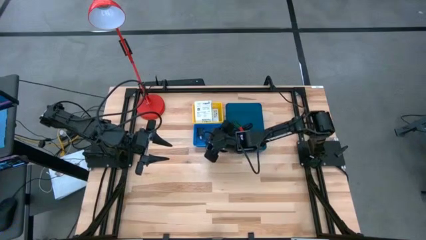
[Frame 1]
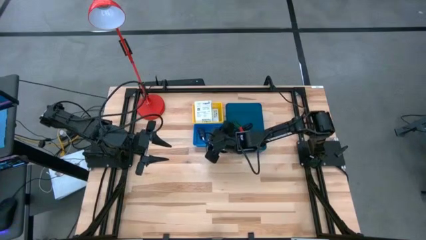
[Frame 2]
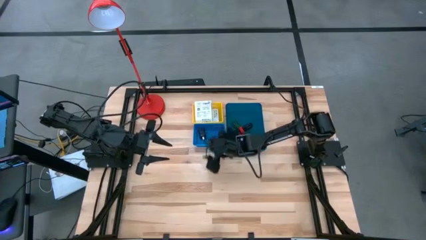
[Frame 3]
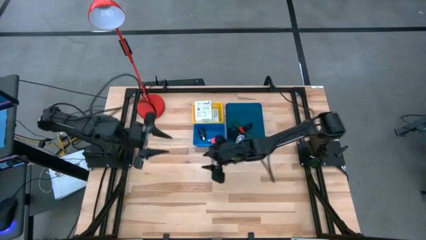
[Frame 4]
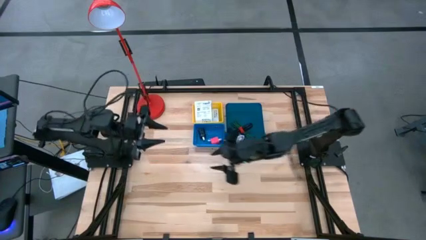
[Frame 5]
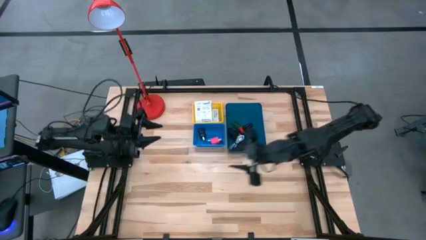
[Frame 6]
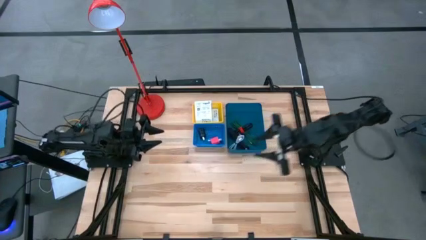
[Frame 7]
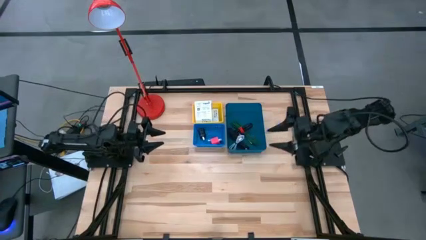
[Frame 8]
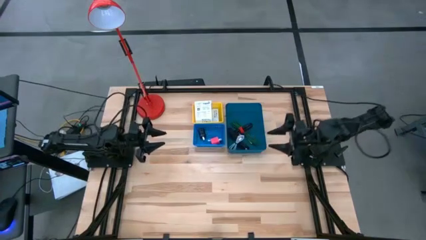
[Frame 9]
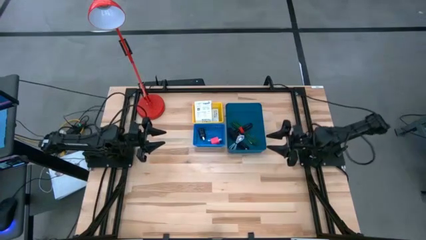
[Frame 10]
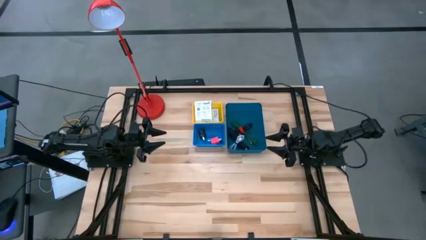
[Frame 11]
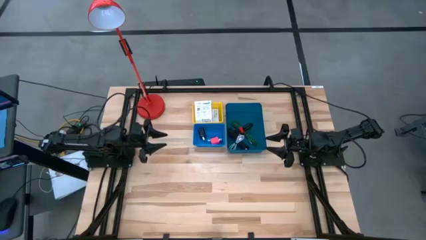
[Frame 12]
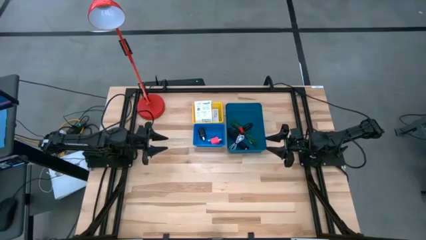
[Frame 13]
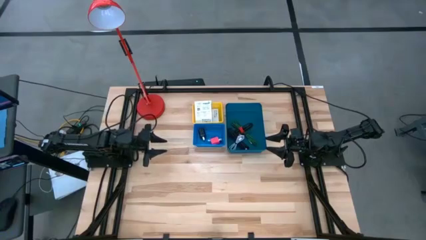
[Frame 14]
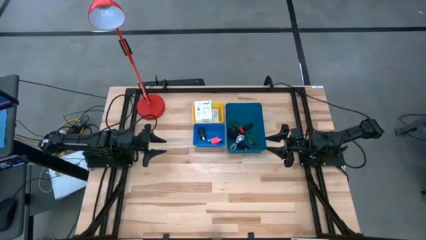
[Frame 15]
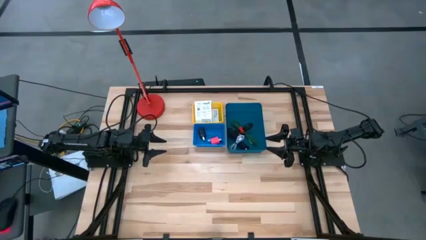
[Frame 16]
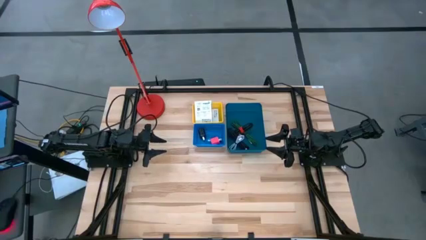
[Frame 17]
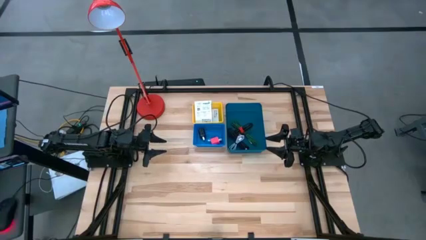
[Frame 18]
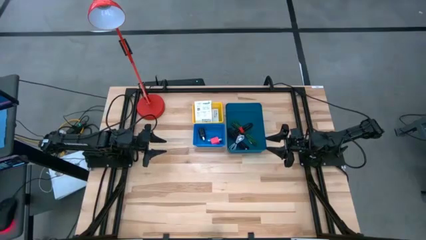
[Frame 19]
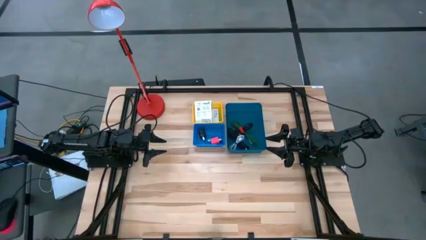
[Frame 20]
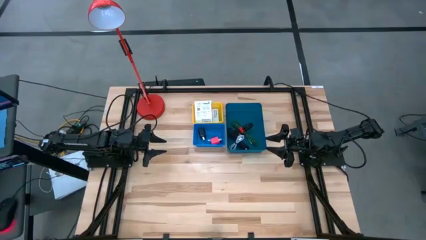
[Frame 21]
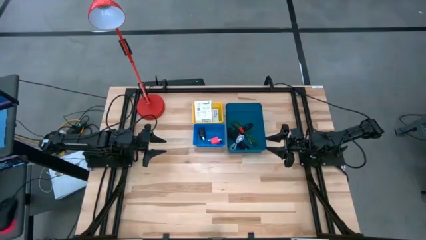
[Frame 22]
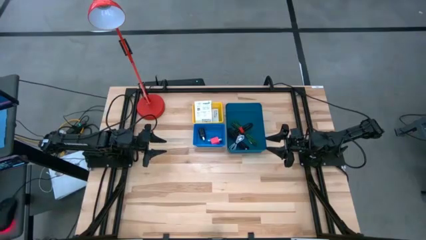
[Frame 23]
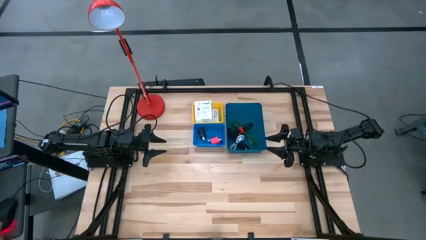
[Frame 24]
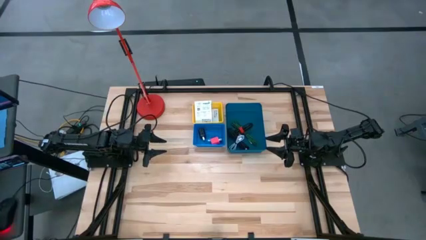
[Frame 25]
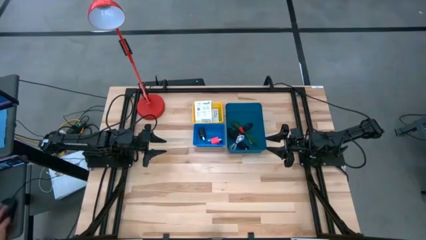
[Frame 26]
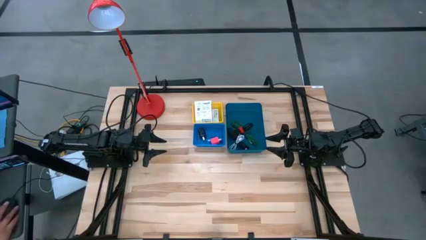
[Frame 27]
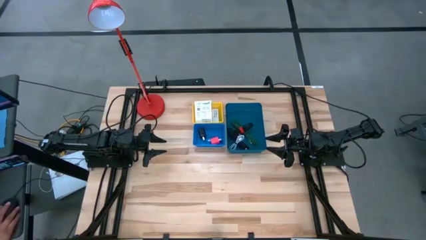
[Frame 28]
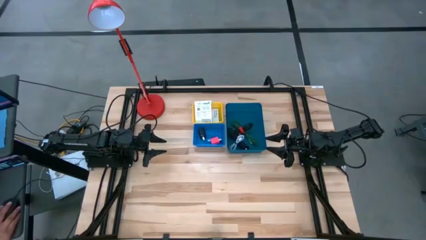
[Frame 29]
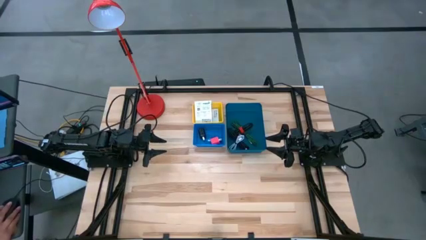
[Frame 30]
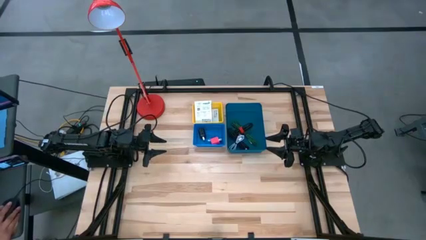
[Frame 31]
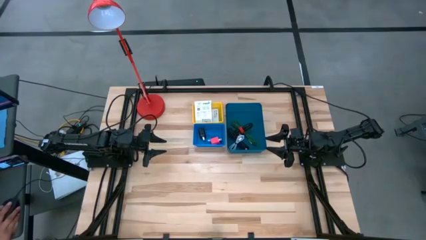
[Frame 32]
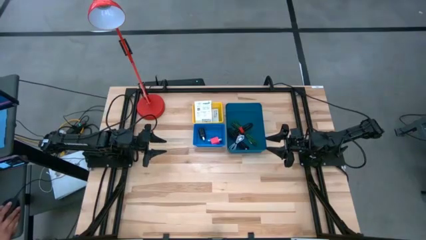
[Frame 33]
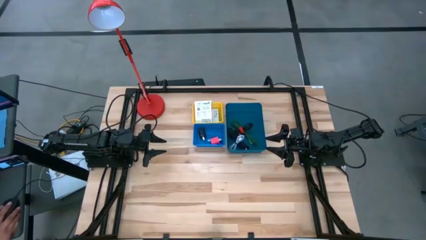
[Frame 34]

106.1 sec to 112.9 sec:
Task: Pick and place items into bin
Return to Home Position

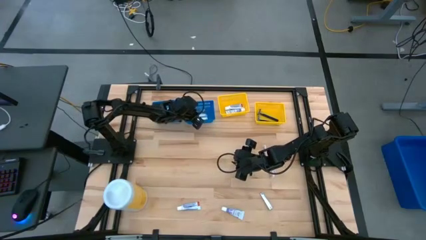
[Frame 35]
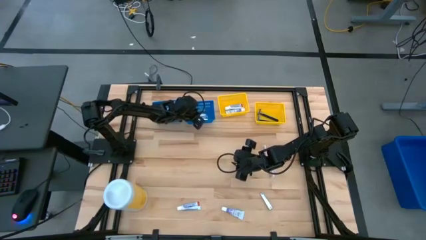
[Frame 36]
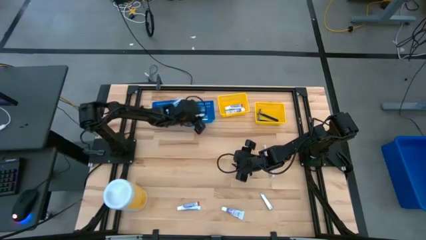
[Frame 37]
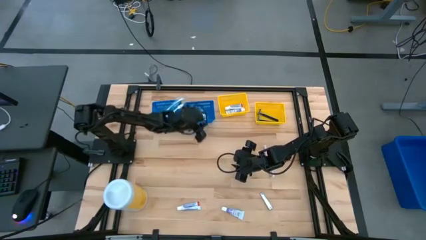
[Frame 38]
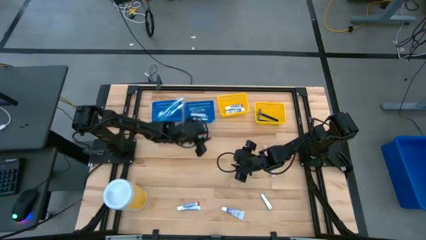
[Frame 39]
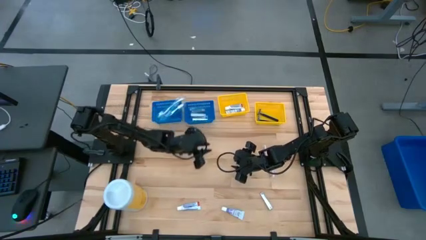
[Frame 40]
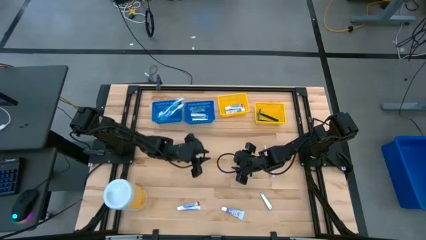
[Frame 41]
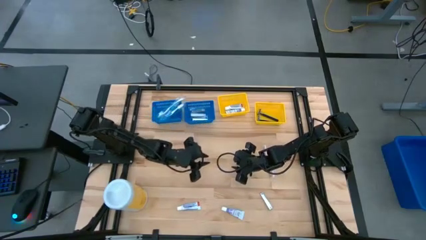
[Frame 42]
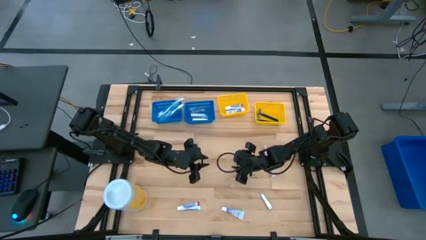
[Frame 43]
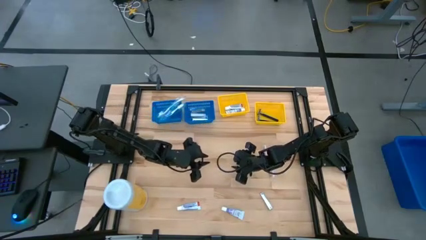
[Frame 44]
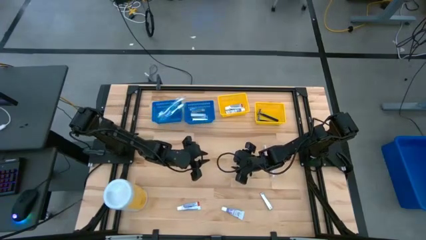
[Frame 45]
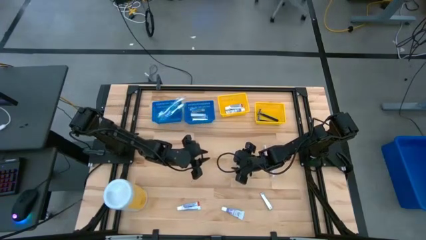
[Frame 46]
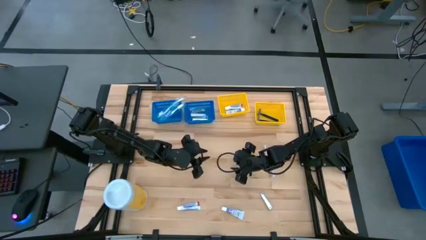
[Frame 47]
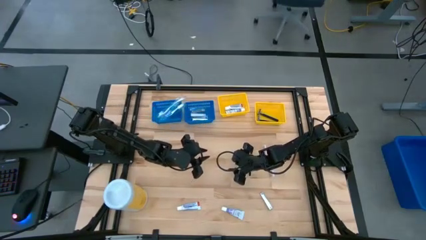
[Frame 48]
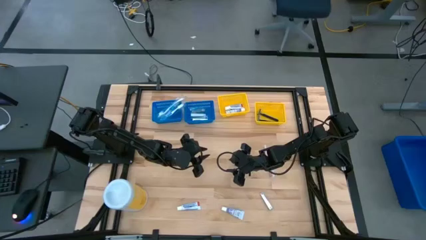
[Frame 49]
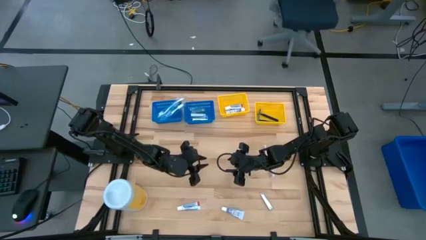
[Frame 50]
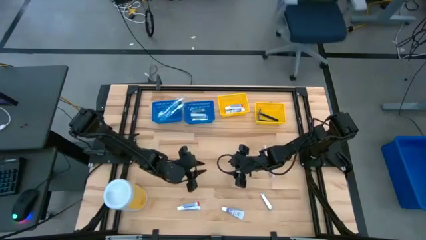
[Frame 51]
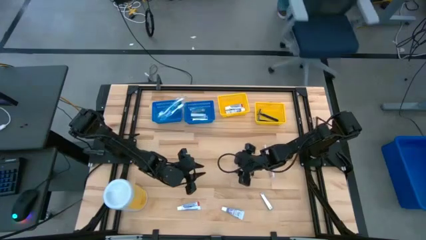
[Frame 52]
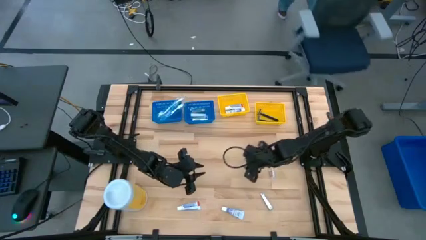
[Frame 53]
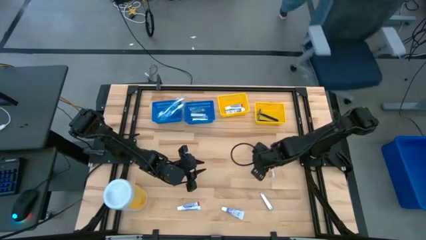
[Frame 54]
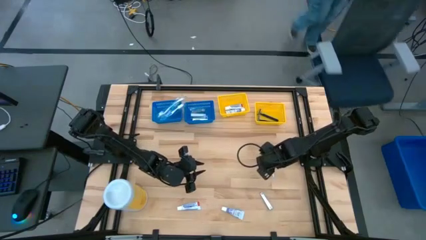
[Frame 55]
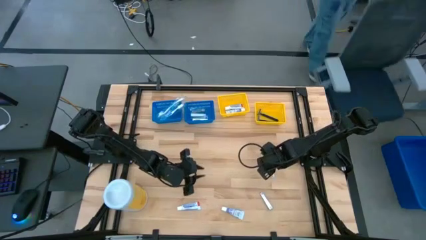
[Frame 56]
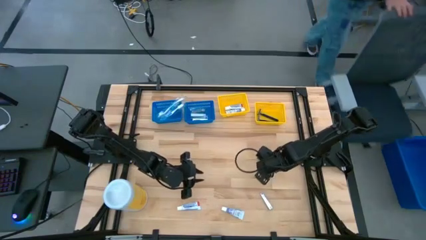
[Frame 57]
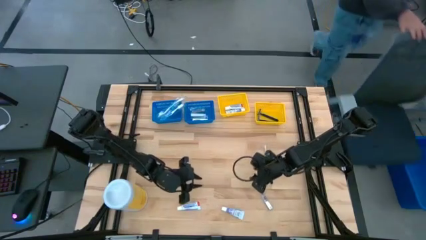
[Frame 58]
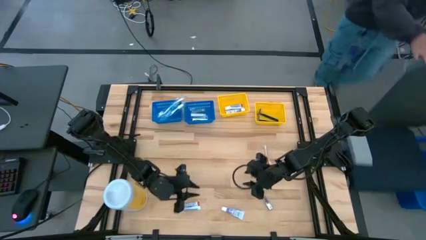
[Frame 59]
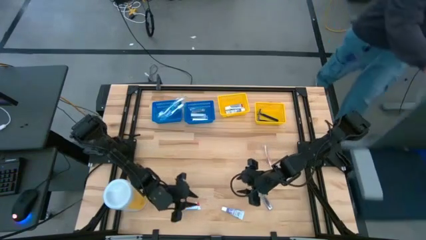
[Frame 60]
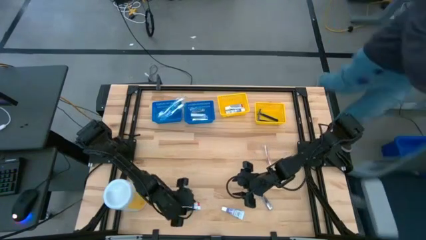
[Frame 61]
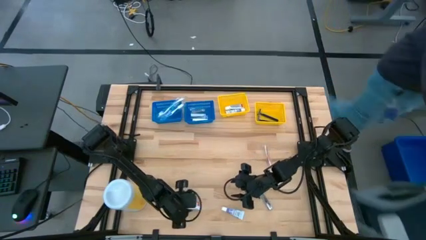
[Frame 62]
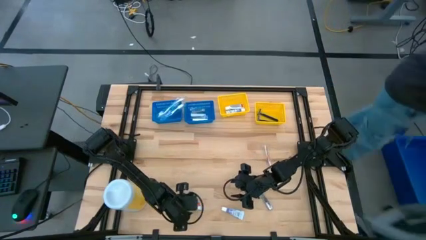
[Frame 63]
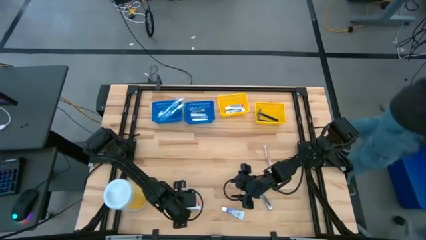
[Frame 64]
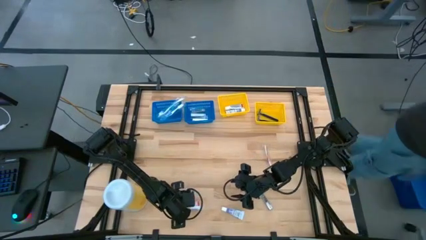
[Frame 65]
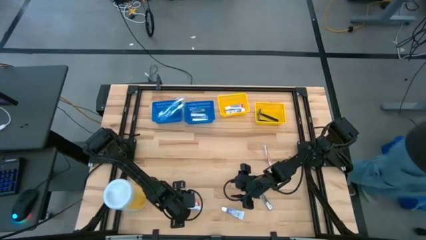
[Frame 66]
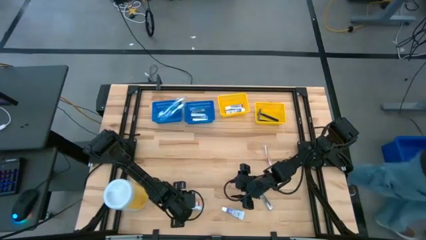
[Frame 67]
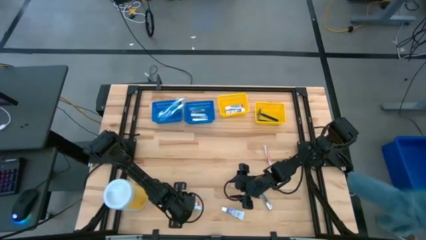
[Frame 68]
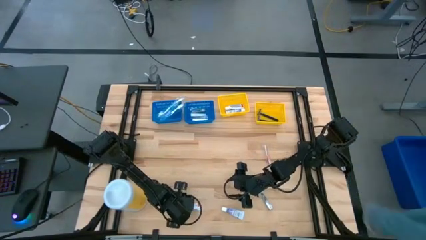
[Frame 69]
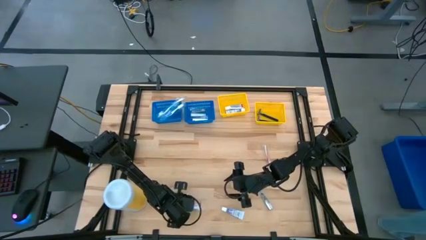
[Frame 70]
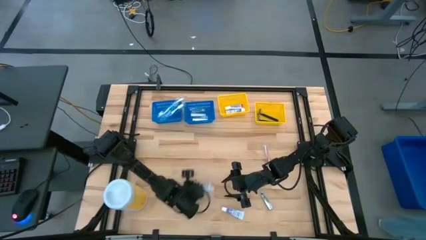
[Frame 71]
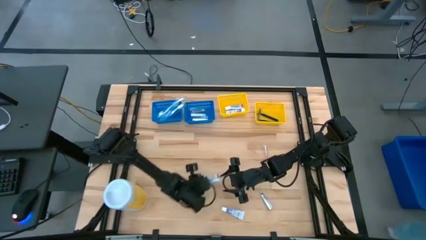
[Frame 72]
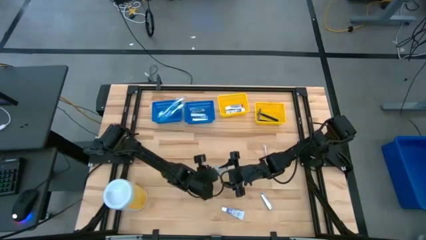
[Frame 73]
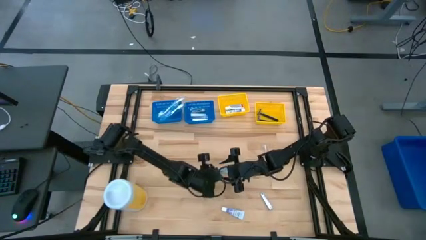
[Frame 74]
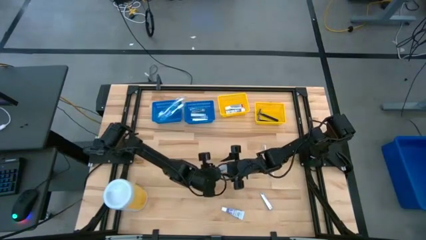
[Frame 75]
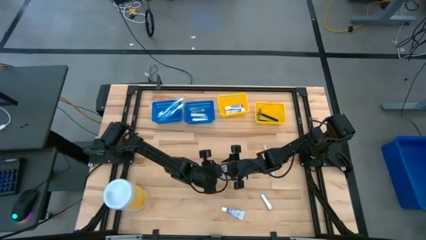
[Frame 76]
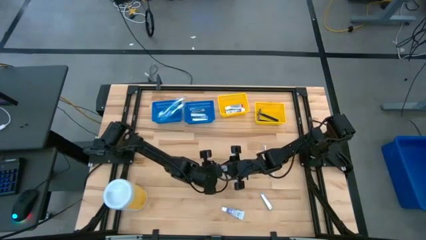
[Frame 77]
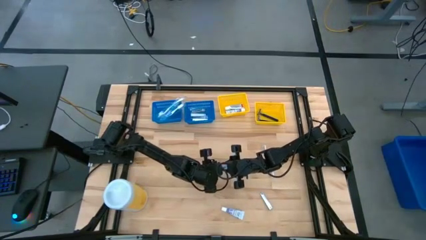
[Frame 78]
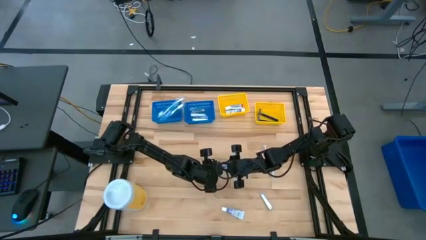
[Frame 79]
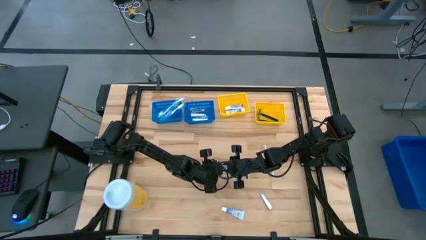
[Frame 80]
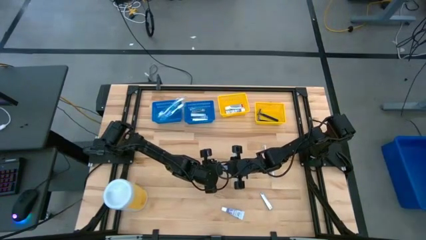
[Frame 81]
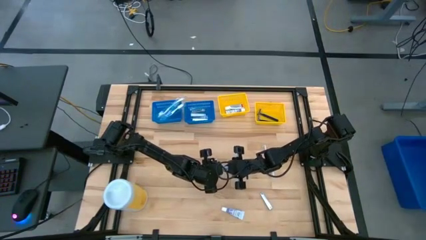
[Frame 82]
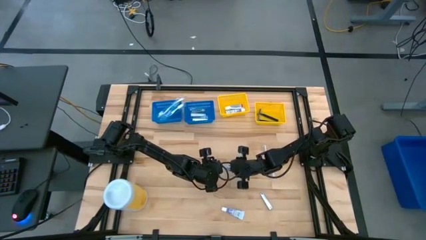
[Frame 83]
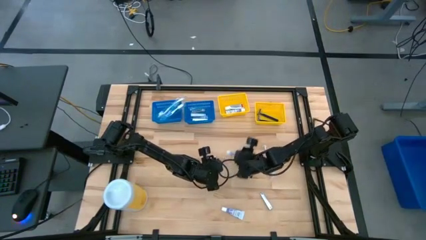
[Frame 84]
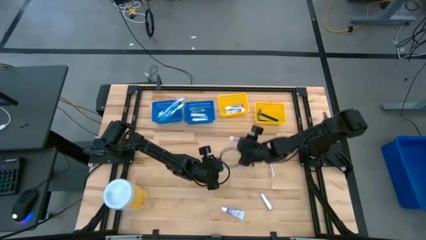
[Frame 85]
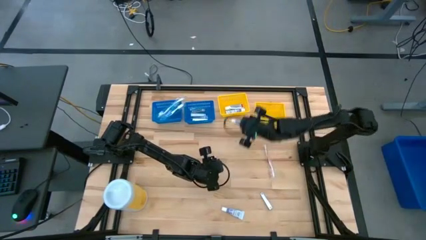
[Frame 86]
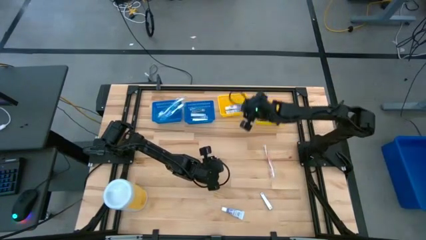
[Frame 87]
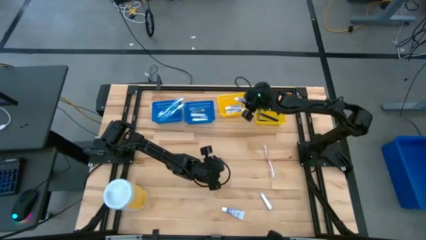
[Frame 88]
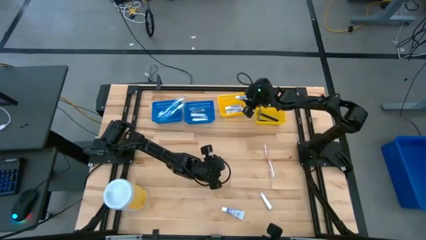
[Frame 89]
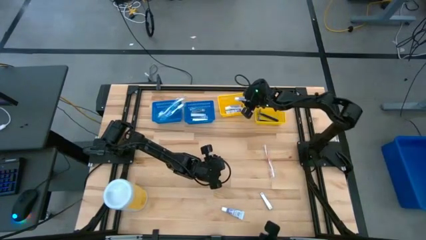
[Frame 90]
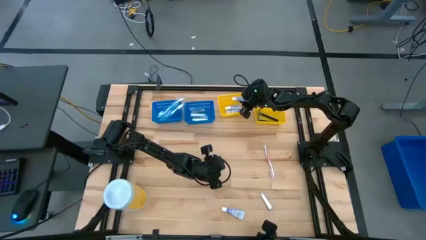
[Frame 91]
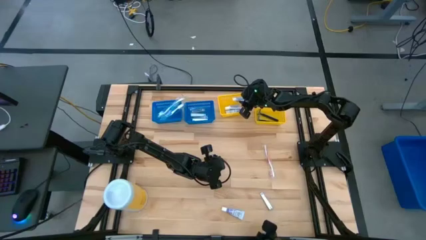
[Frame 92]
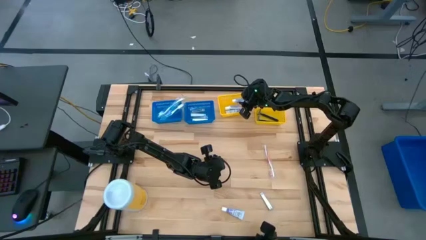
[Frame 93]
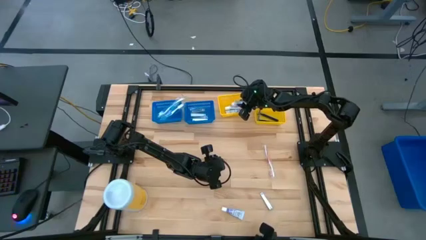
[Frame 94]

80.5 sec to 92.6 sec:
Task: Pick & Place Travel size toiletries
Put the white toothpaste into the left yellow bin
